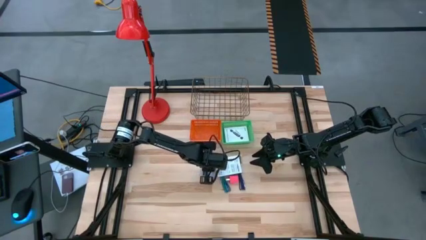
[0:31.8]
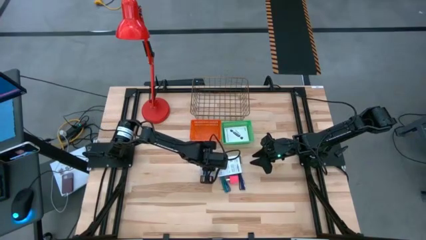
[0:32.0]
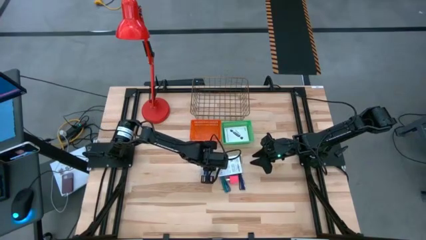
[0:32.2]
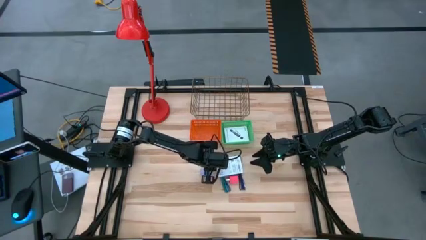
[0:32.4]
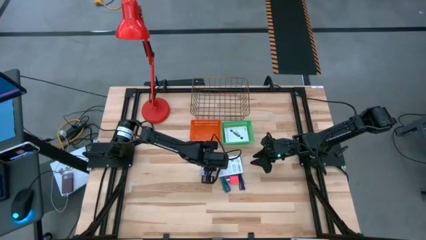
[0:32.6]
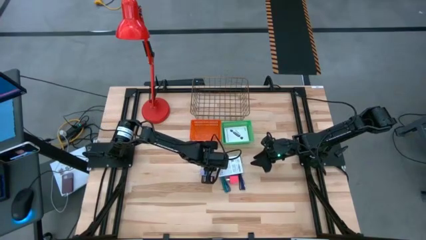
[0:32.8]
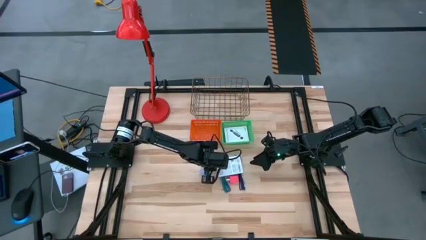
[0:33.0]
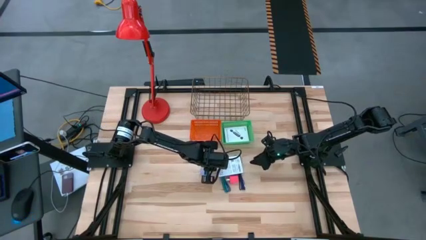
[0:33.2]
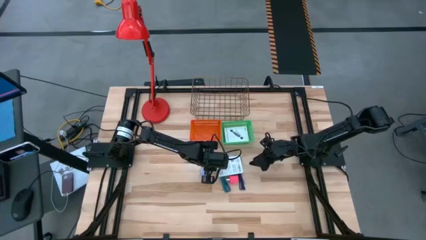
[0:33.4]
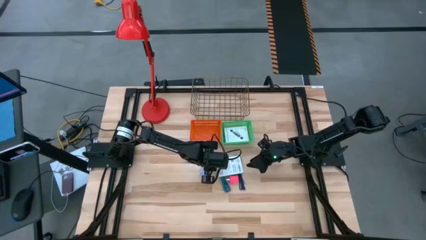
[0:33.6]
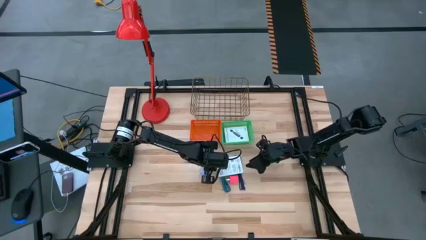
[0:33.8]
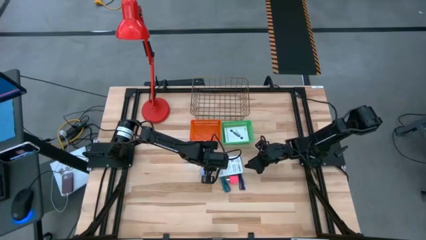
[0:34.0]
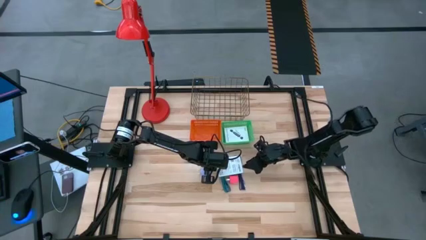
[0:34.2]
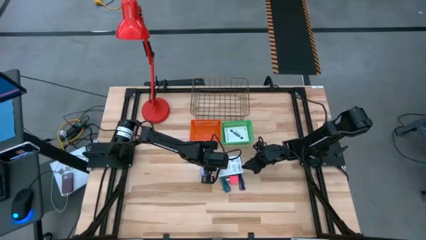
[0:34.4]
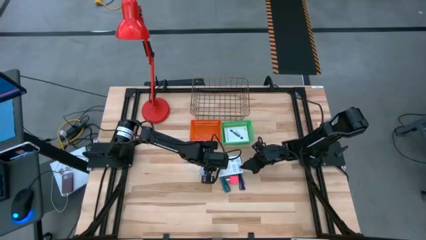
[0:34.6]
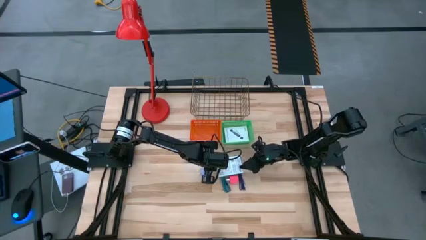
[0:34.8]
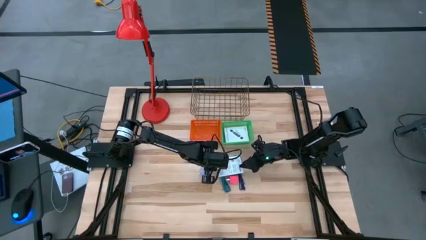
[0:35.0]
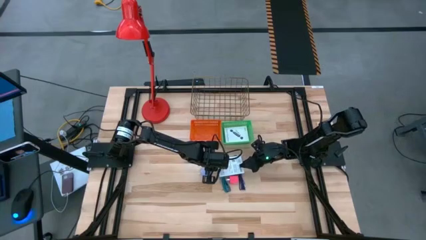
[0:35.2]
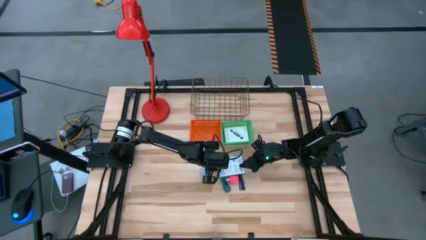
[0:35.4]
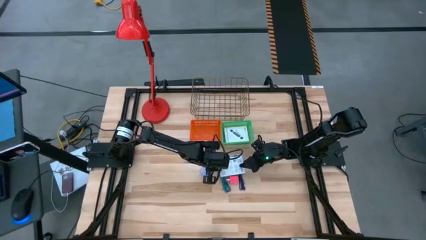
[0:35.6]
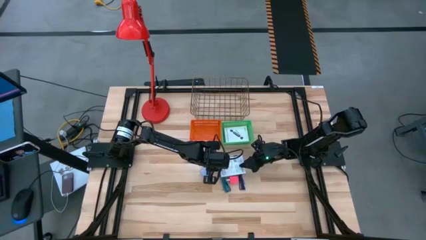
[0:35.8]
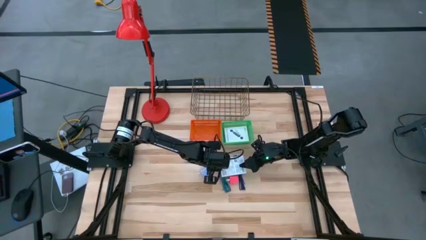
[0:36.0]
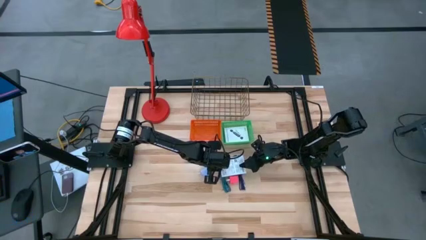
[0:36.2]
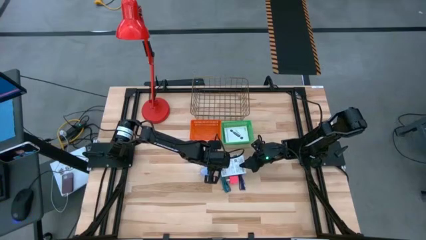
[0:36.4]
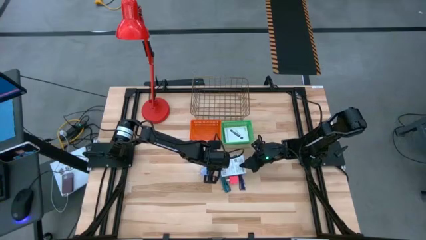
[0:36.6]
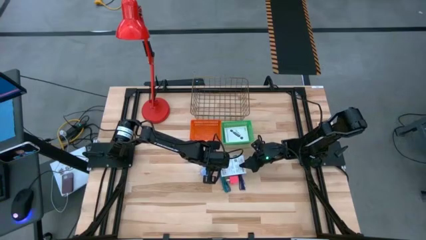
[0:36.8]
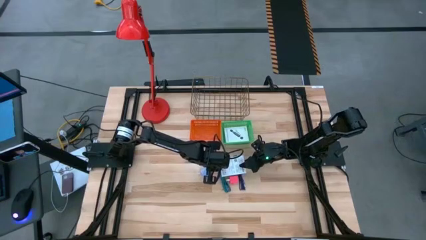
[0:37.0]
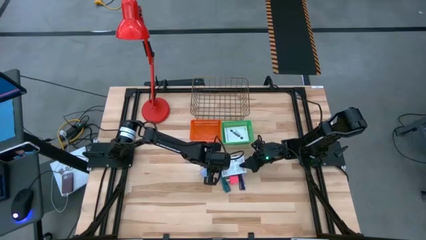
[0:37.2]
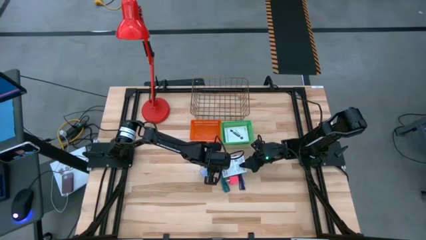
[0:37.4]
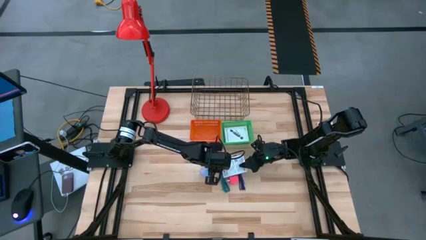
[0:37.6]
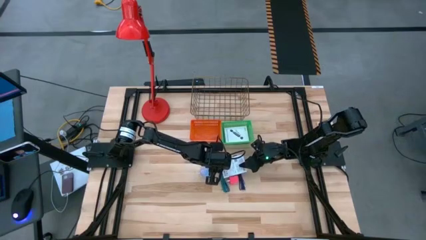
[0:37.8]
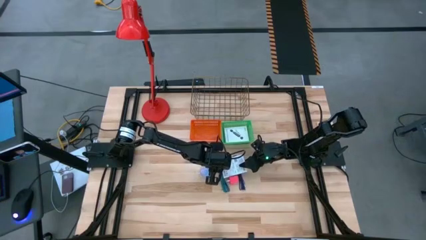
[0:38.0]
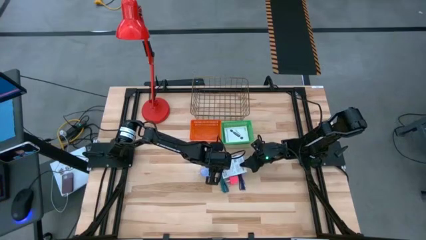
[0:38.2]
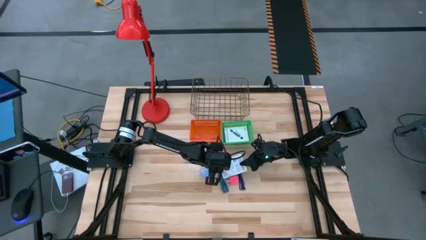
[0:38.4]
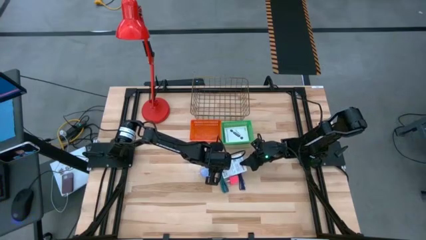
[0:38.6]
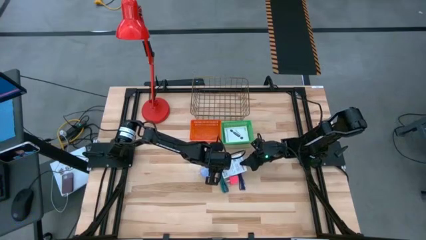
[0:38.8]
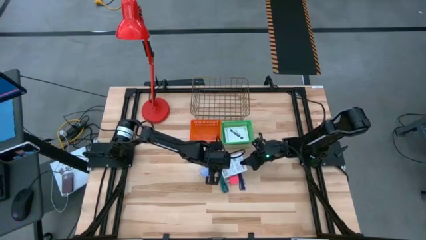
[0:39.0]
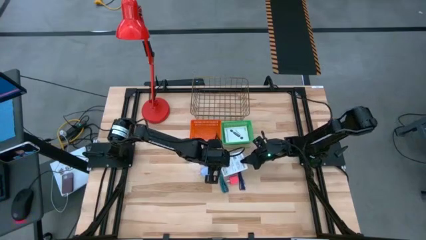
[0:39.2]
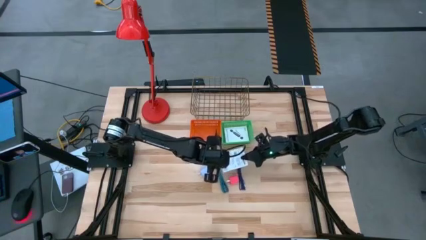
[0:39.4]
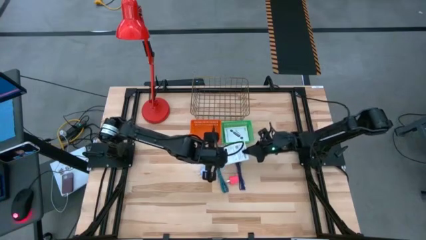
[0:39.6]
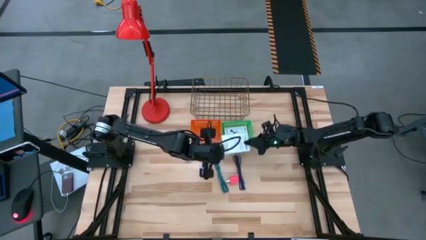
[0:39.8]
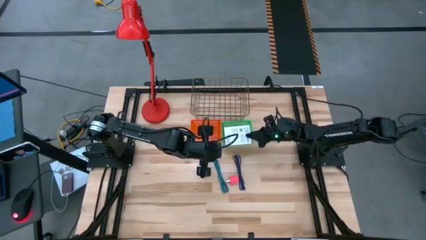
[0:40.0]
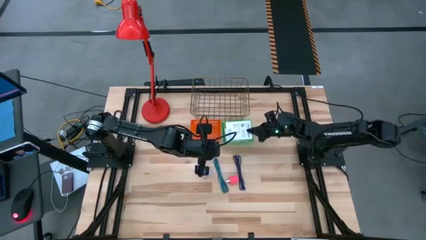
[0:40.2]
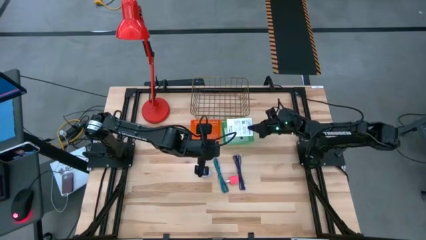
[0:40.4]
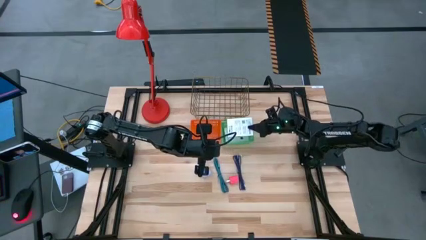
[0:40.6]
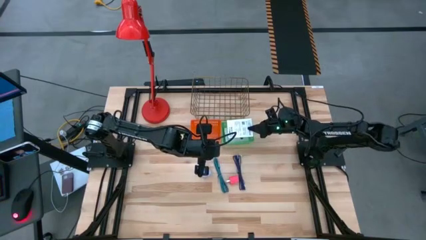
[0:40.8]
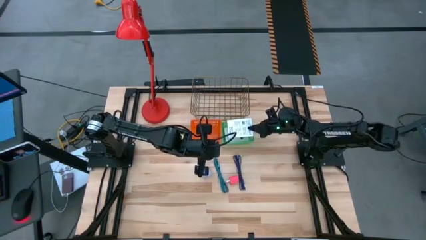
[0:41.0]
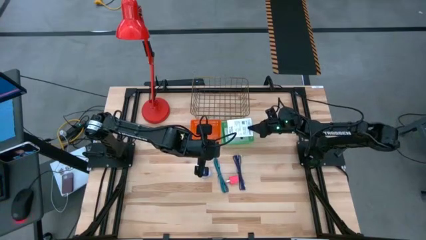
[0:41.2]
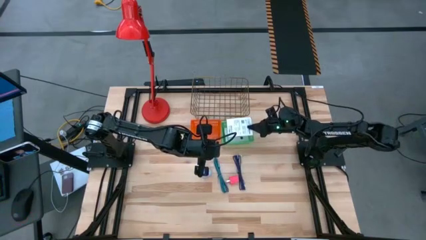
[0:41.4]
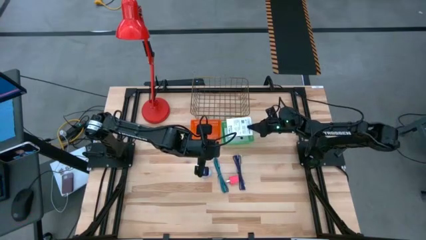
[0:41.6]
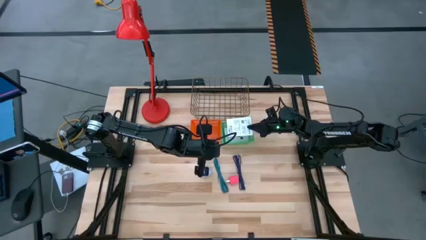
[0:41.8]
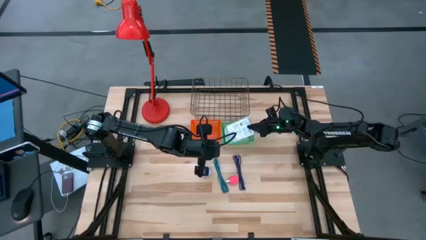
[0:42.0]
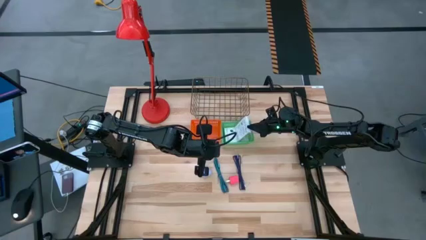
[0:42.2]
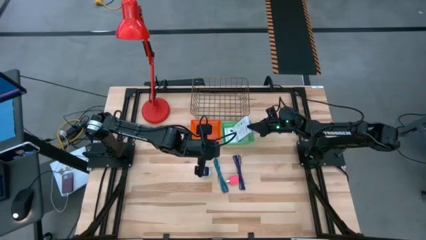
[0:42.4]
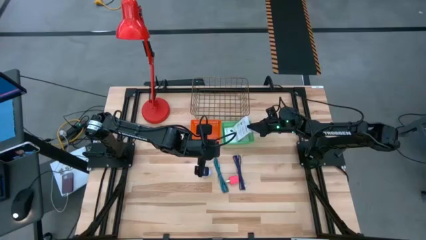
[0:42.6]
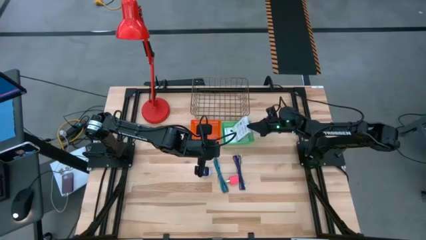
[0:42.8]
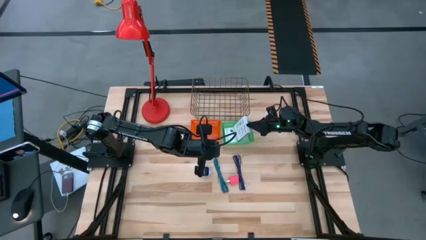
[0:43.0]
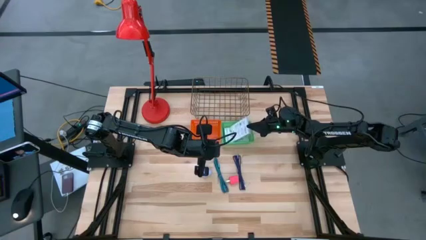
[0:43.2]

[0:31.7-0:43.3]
Task: Pick and place items into bin
Stack the card reader box on top of the card reader box in the green bin

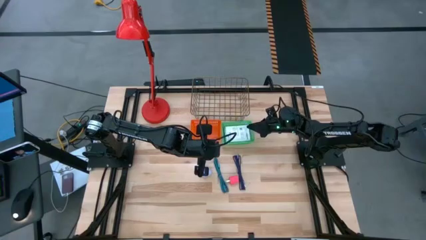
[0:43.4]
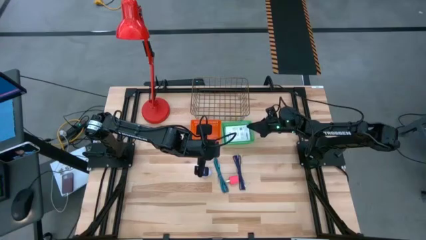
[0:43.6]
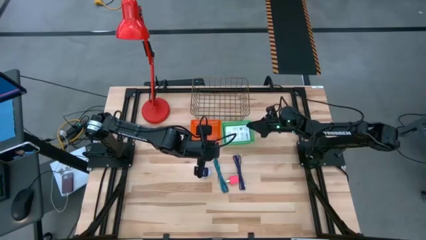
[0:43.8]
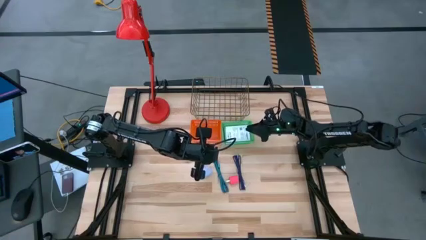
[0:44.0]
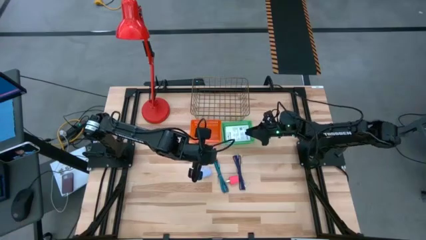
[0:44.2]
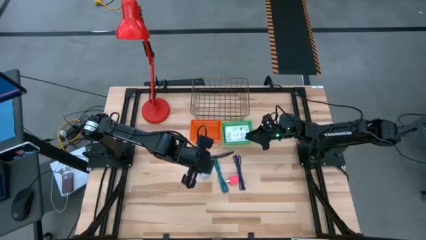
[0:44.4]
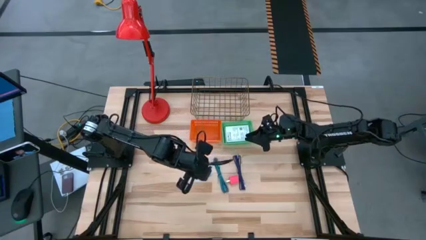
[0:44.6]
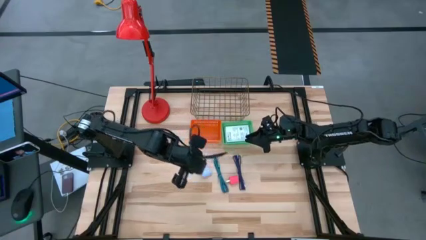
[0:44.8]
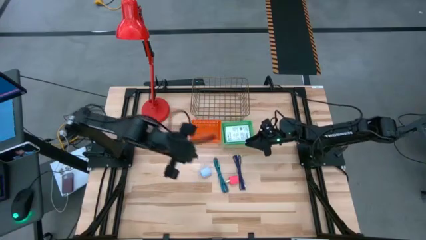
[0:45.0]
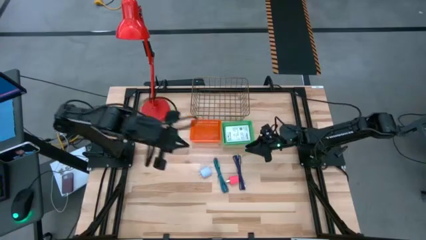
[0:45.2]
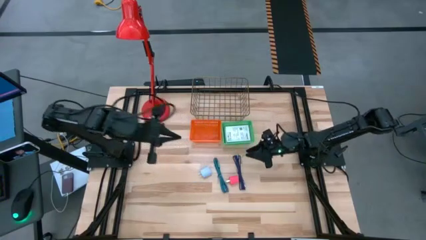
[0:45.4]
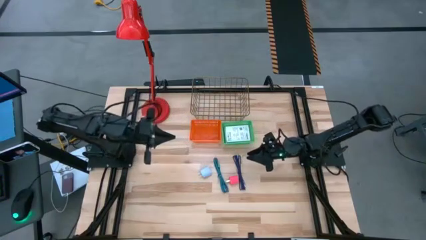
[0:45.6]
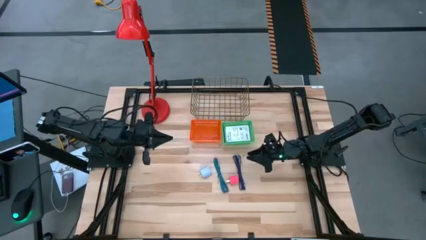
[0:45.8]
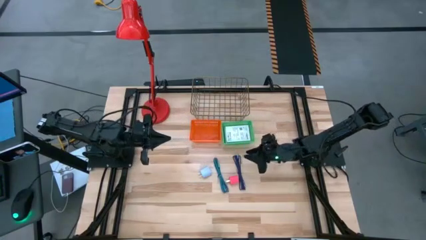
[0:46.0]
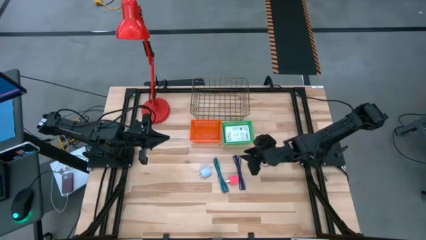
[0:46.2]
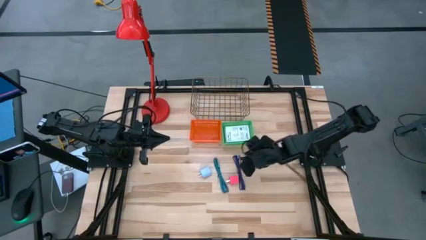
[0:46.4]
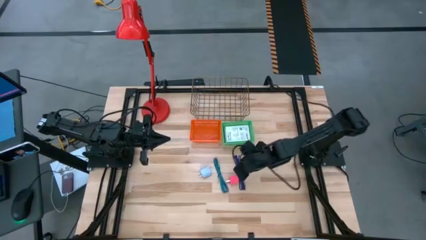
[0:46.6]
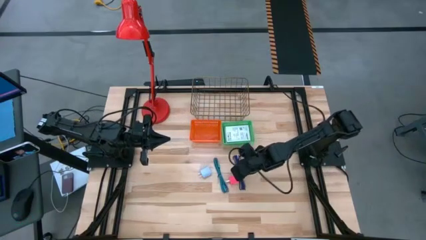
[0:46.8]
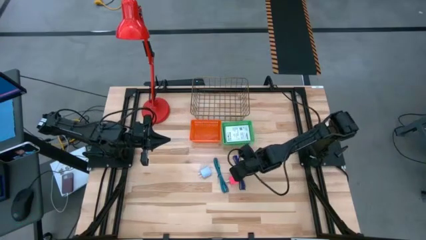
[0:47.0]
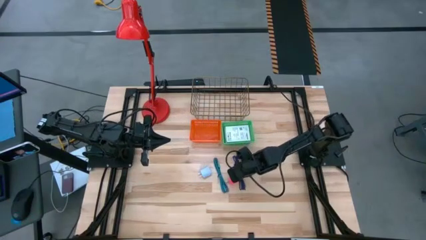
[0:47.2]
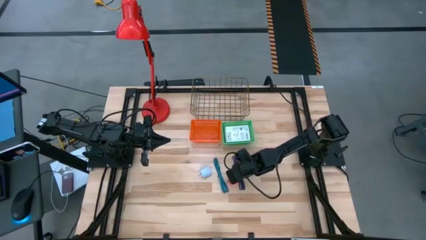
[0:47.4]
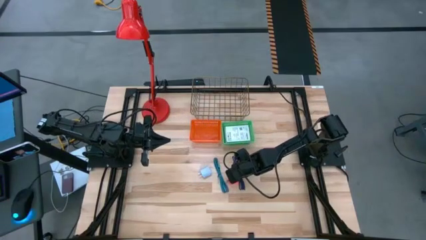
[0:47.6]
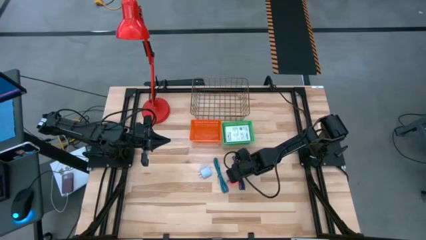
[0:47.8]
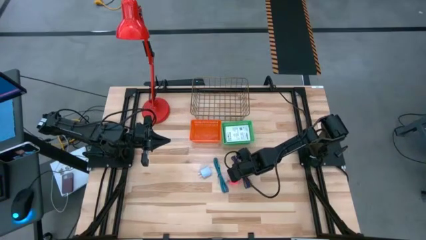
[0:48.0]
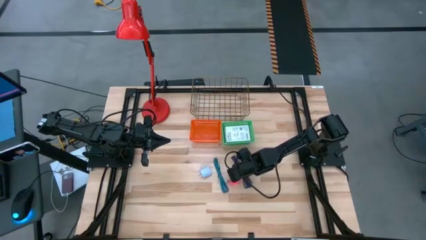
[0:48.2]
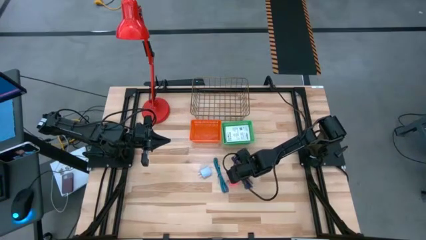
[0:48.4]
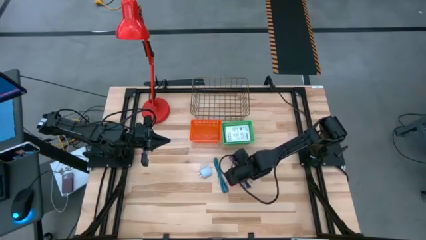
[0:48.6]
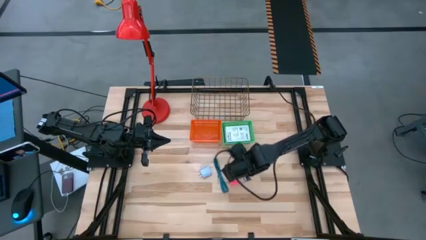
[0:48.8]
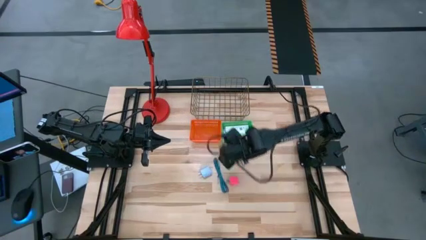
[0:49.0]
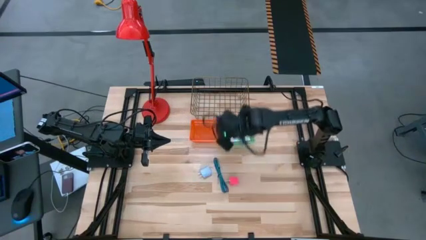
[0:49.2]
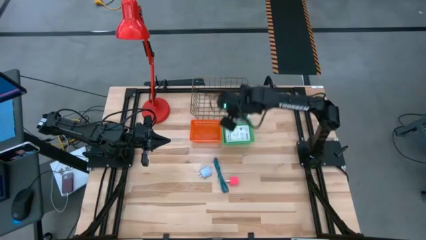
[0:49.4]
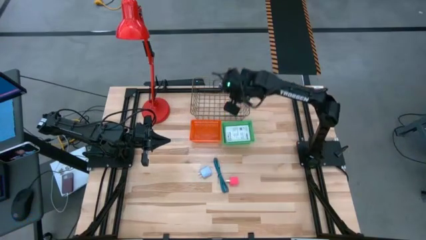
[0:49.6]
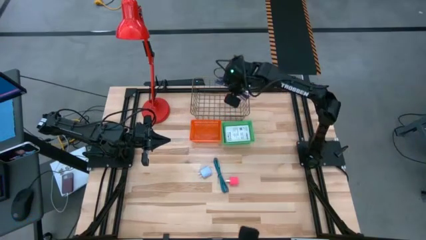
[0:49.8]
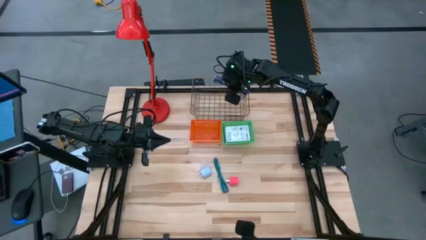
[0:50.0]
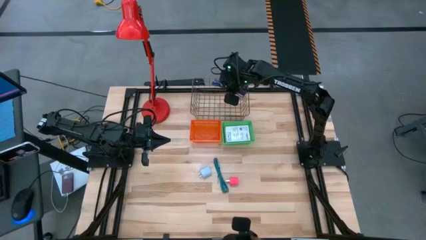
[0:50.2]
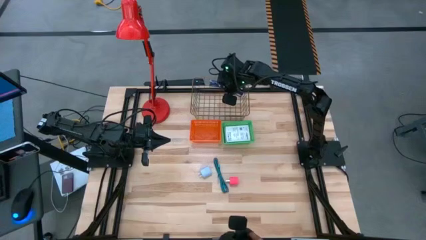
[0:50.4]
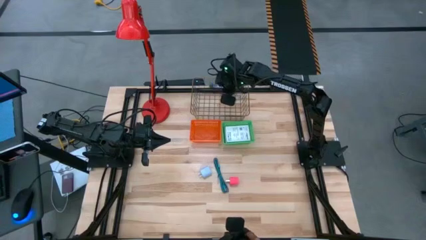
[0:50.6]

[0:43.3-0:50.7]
Put the purple charger cable into the wire basket
